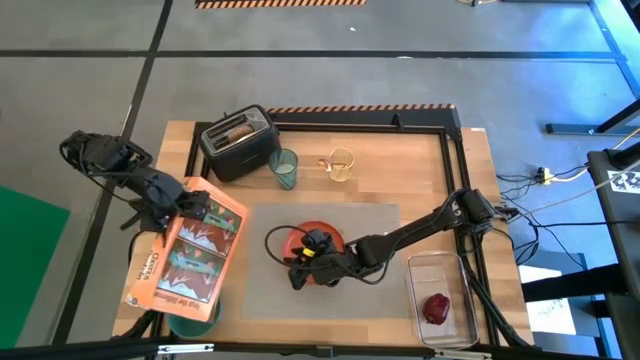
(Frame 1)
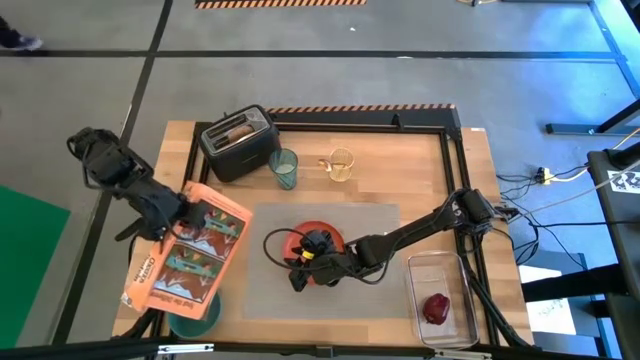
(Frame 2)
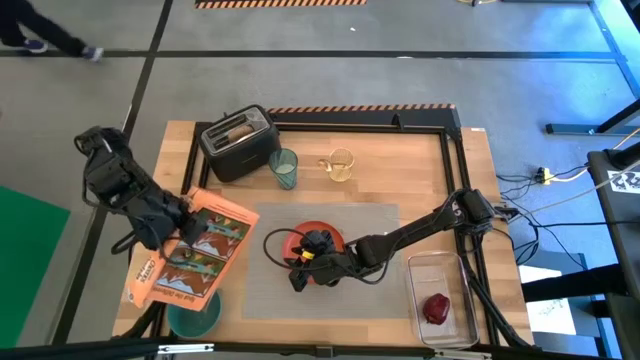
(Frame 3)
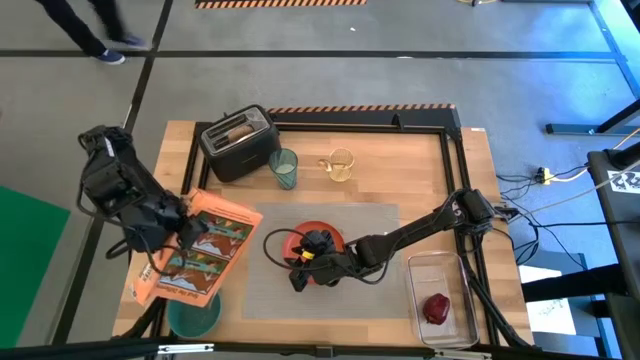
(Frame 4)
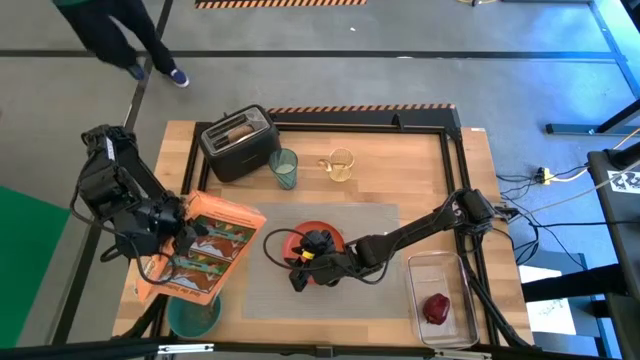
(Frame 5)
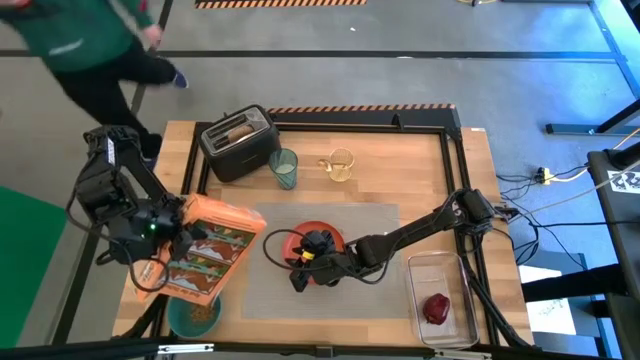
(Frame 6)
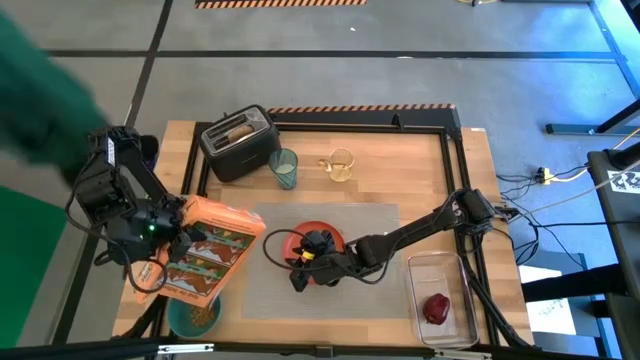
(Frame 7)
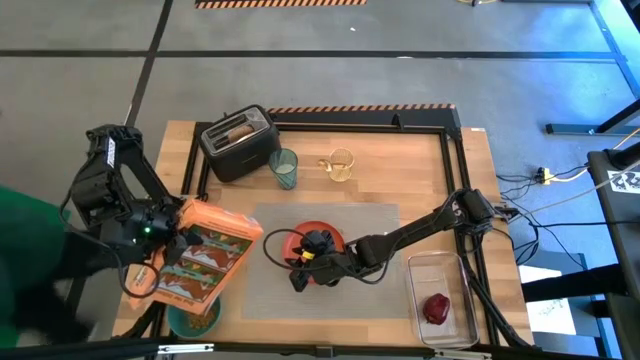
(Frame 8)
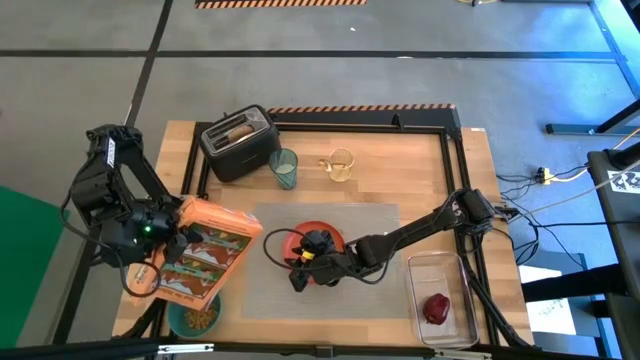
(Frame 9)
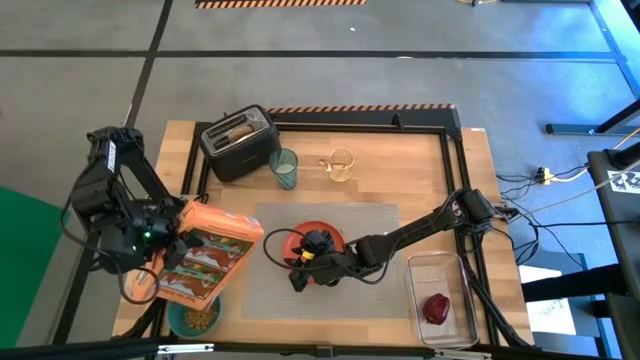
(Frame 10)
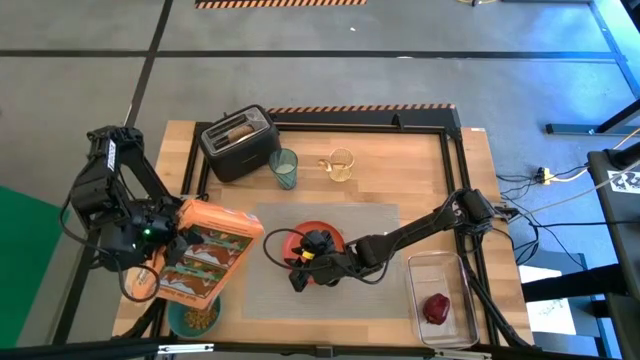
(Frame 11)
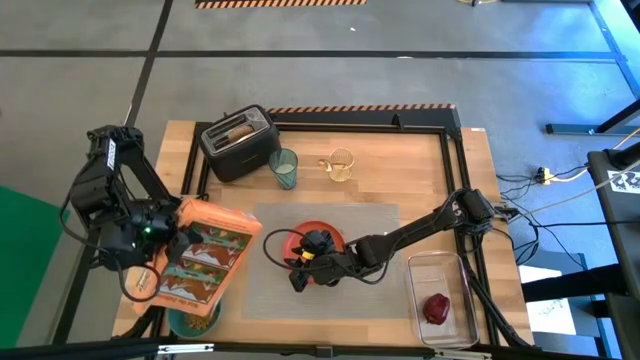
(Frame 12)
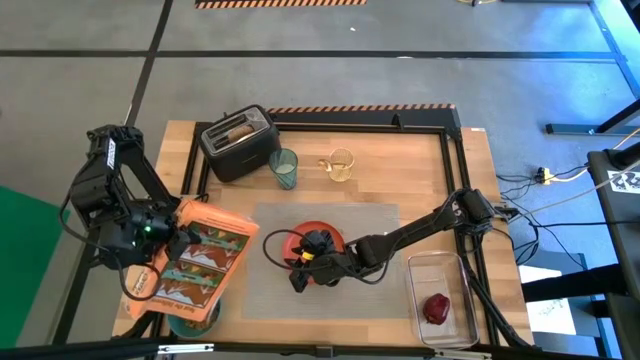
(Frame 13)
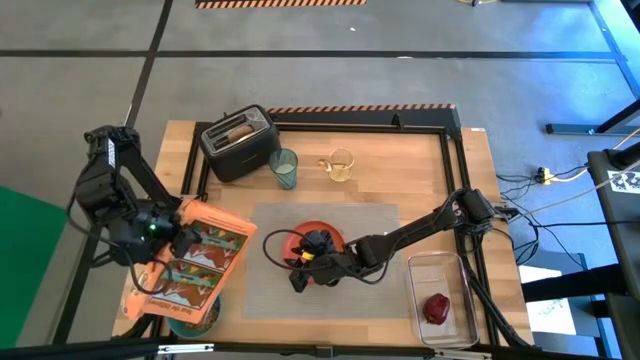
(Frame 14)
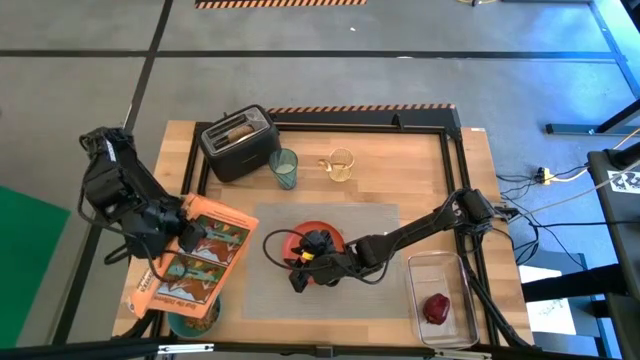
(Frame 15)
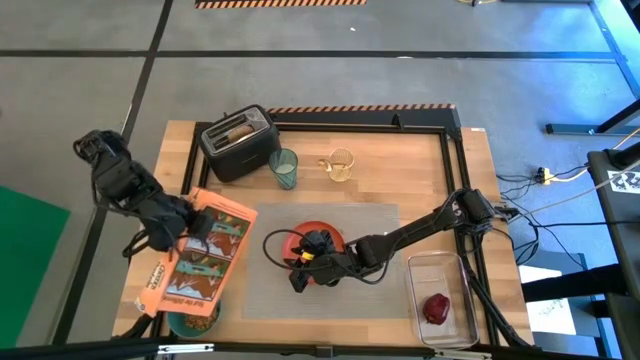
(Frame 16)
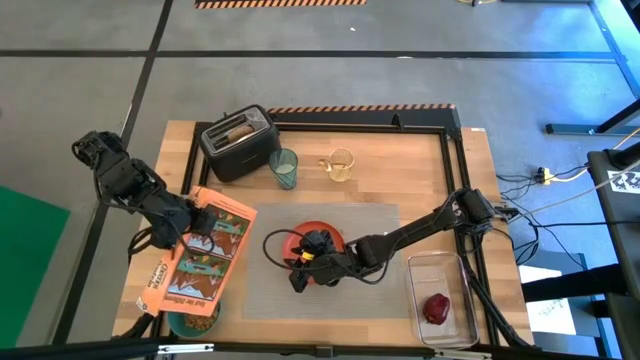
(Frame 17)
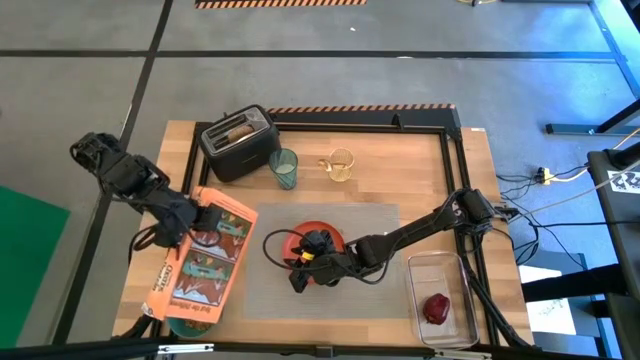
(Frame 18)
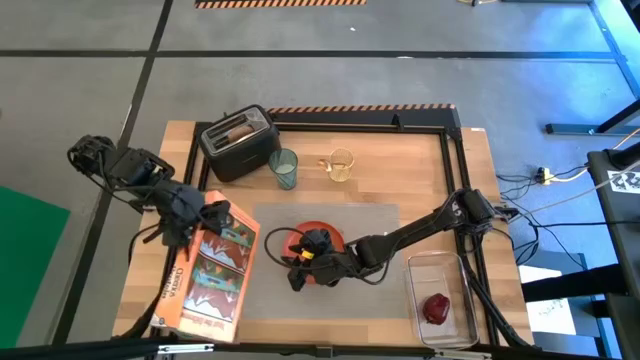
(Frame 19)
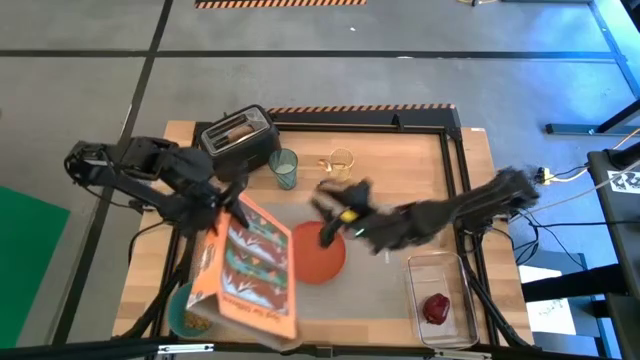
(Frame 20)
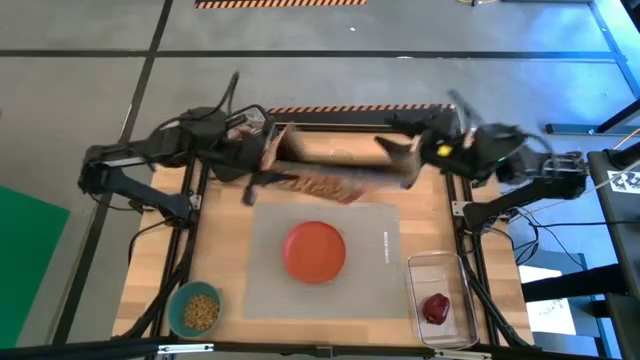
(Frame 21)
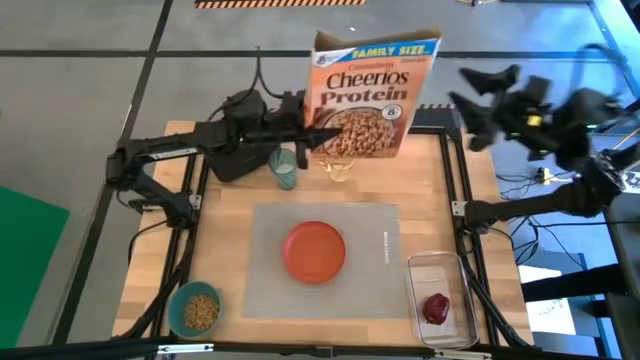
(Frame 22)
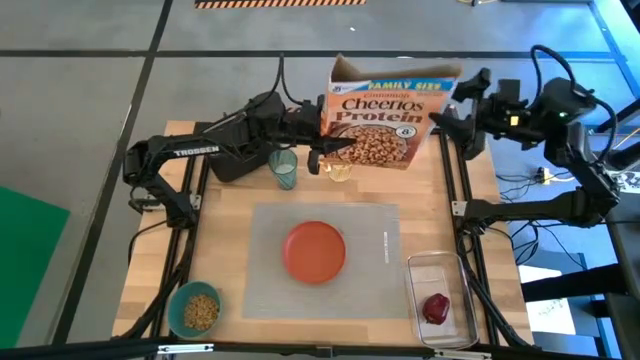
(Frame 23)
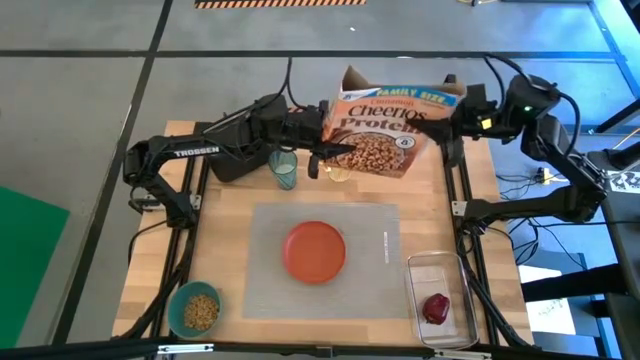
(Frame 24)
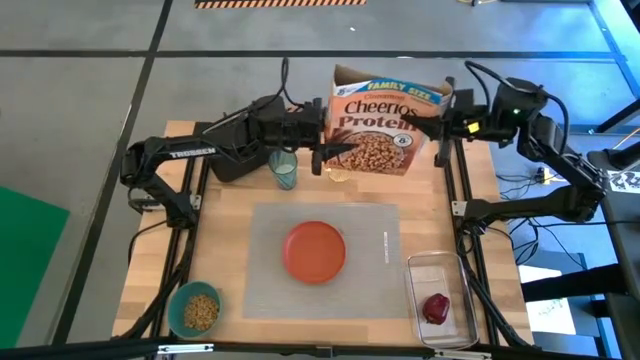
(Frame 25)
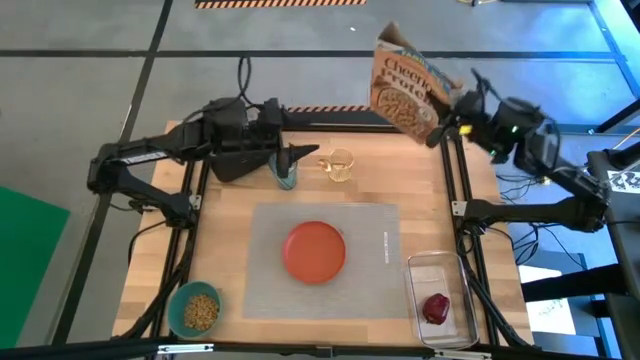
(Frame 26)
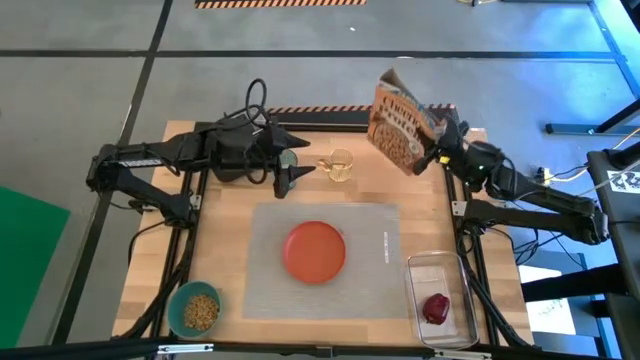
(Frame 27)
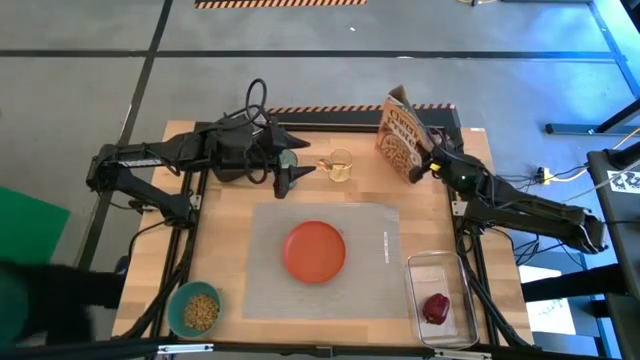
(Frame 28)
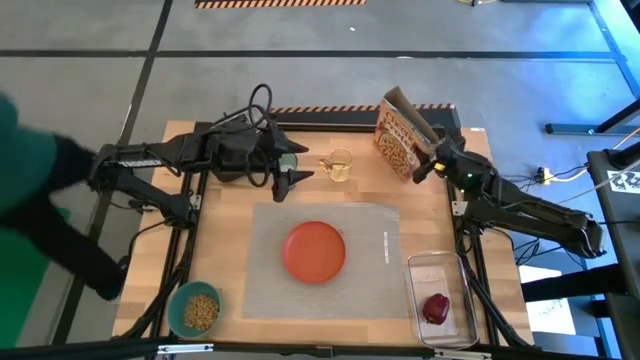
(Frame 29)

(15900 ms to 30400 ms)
Task: Arrange a breakfast setting
Pour the cereal into the green bowl

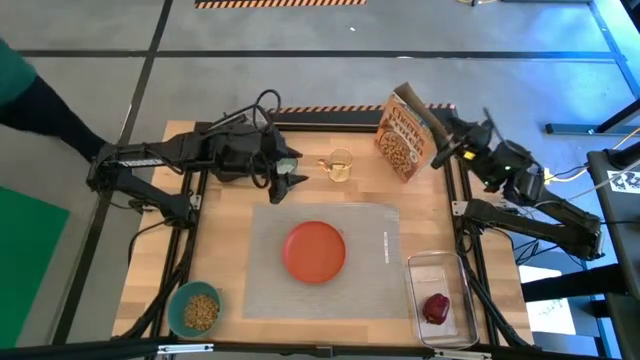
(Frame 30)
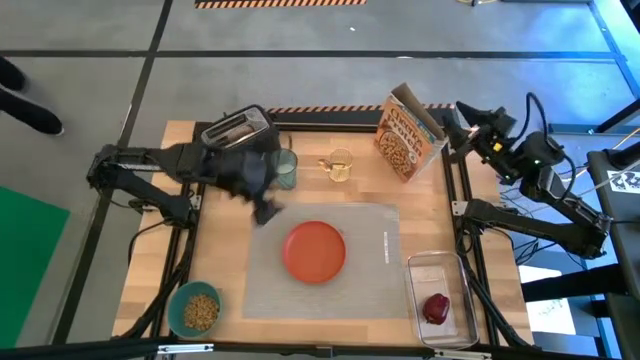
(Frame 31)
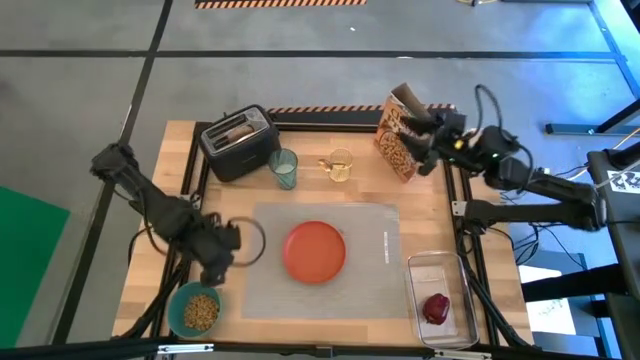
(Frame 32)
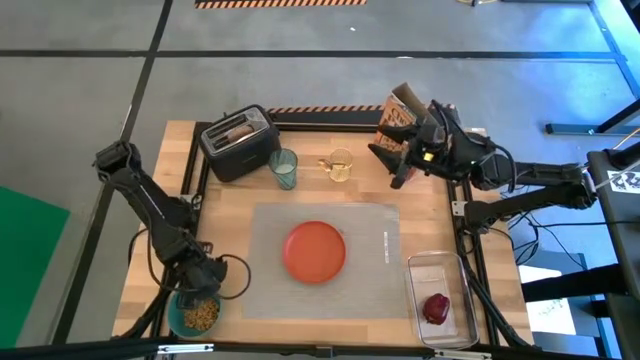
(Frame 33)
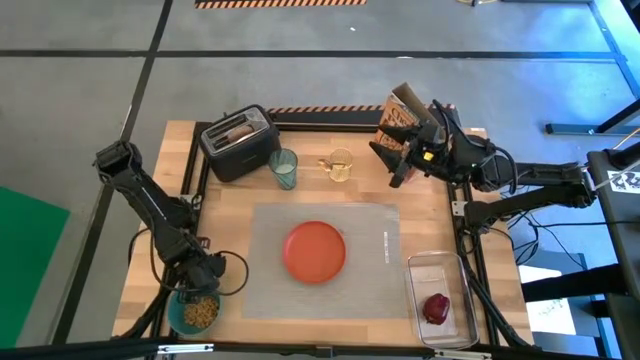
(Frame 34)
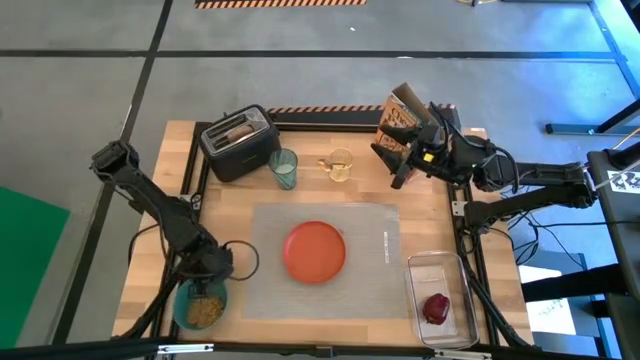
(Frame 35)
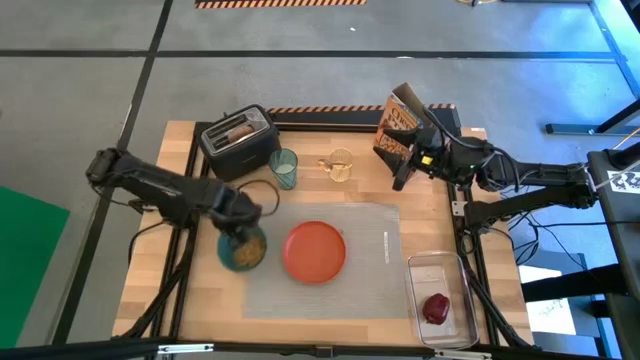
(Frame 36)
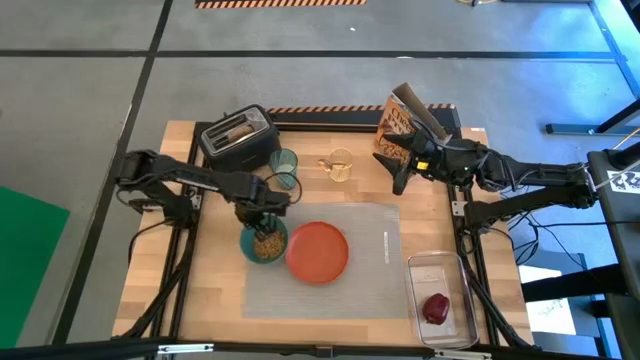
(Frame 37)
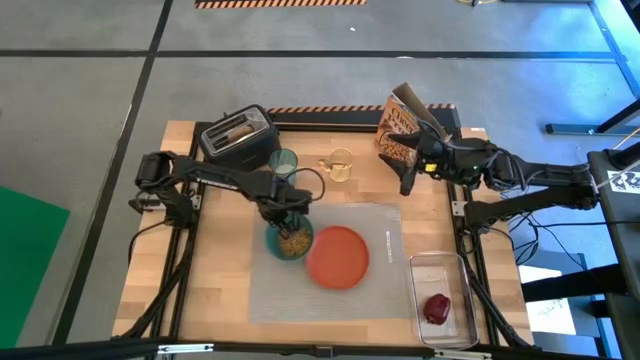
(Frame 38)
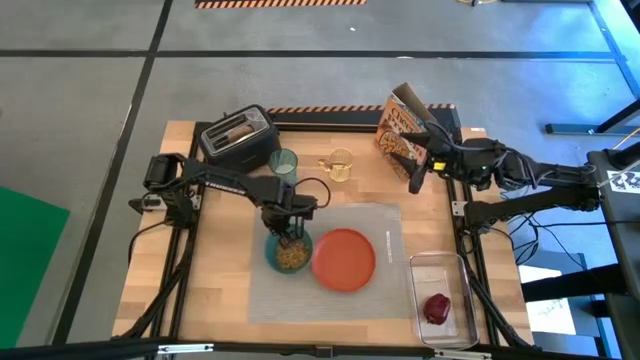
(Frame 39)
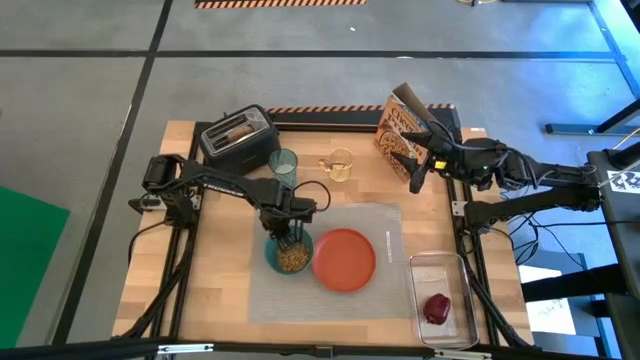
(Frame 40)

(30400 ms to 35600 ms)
Put the blue bowl to the left of the orange plate

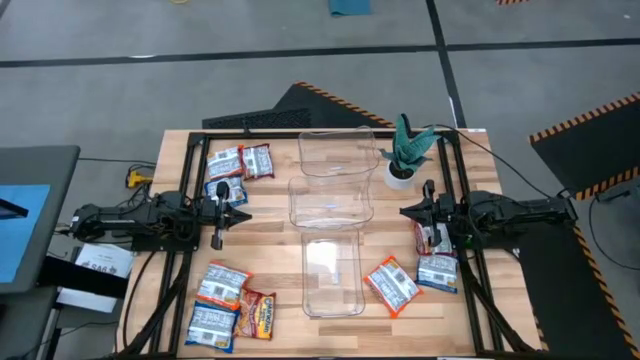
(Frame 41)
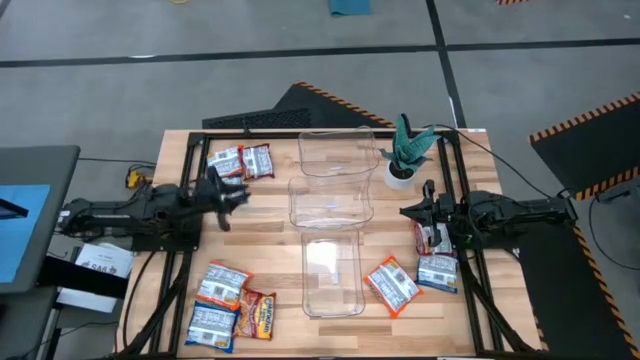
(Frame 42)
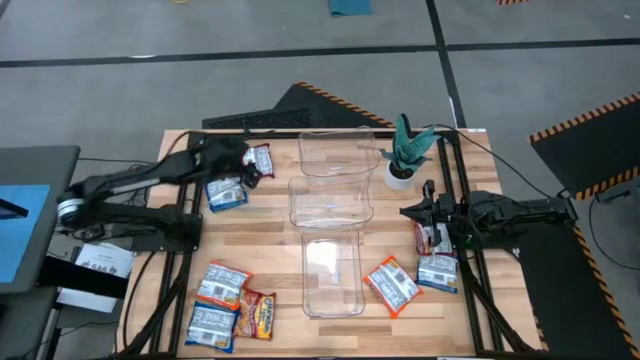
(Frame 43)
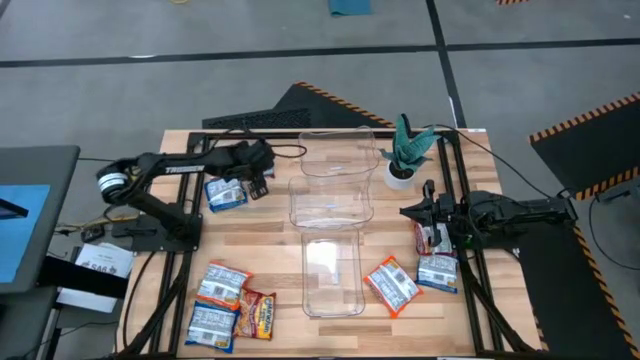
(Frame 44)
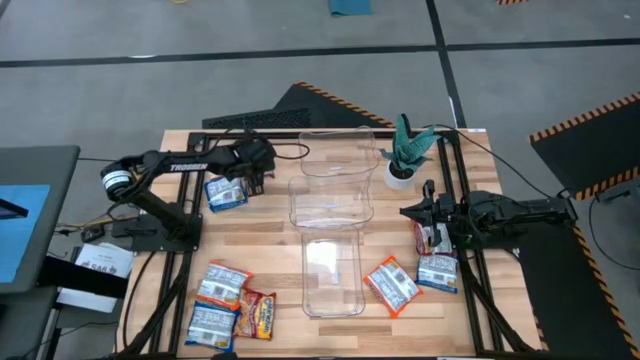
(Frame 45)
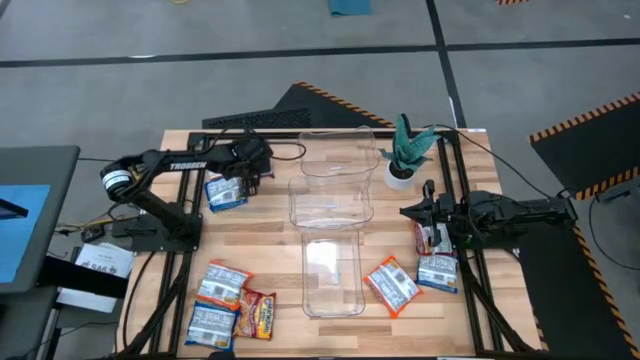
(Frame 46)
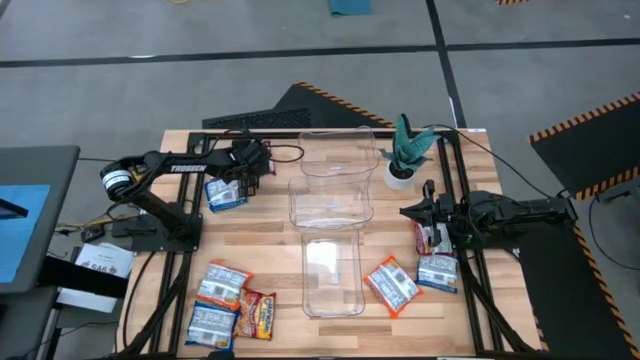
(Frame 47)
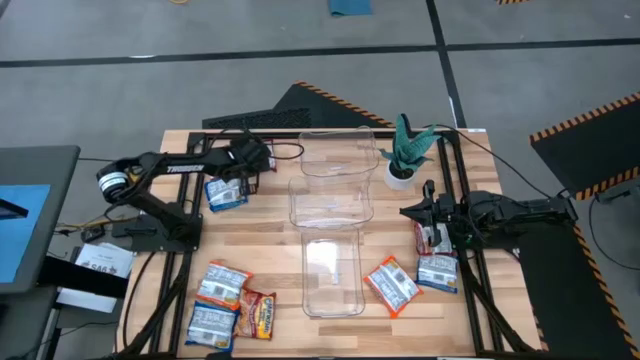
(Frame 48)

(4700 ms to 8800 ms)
Task: Sort Maruchan noodles
Put the top red noodle pack into the top transparent bin
